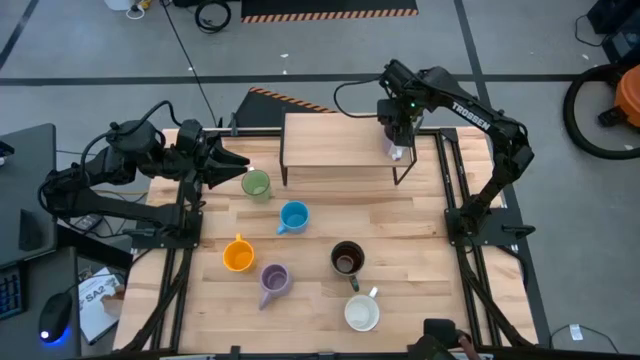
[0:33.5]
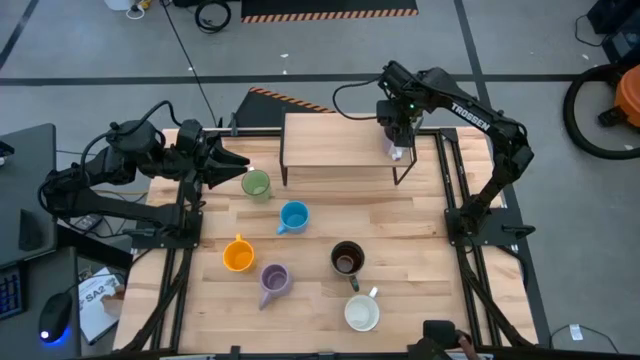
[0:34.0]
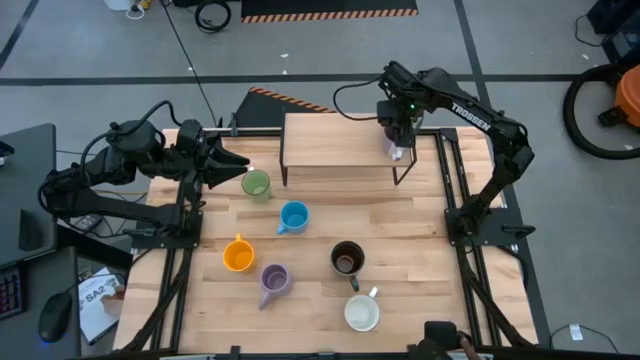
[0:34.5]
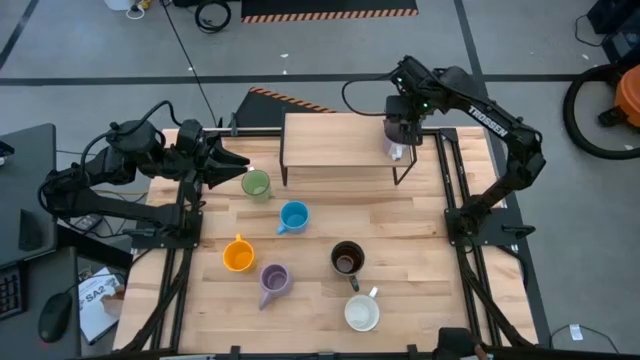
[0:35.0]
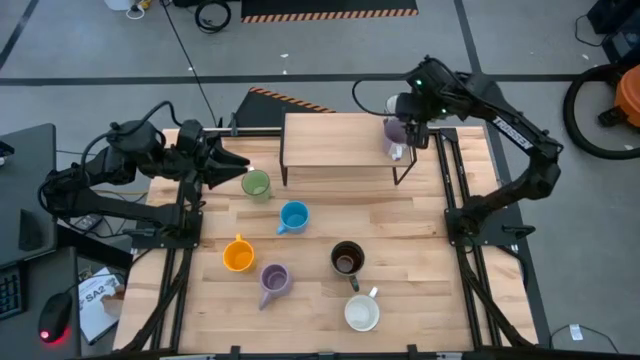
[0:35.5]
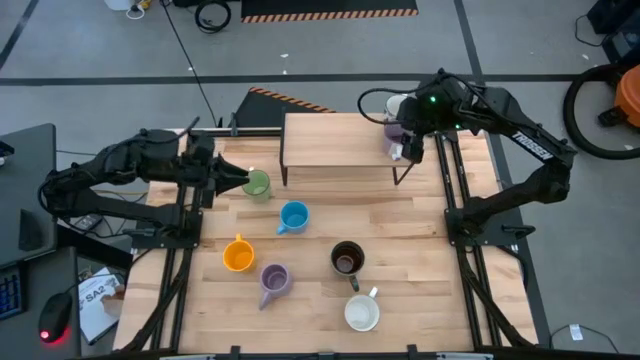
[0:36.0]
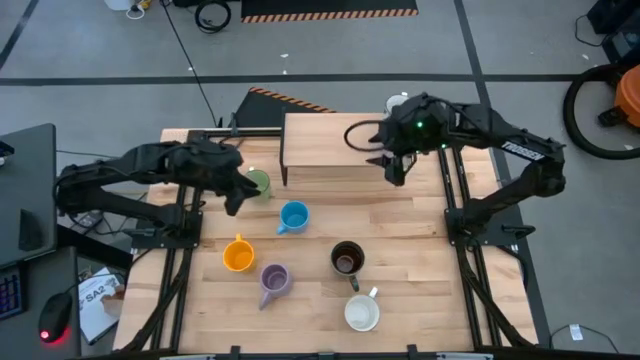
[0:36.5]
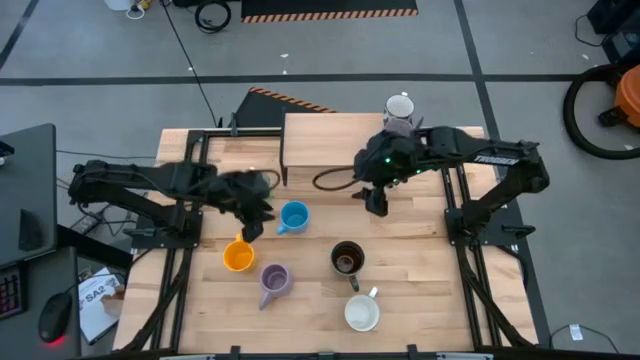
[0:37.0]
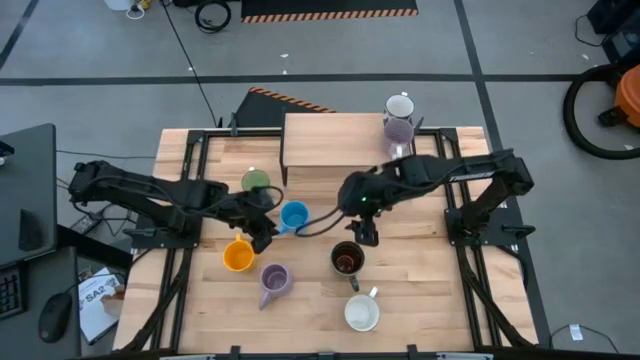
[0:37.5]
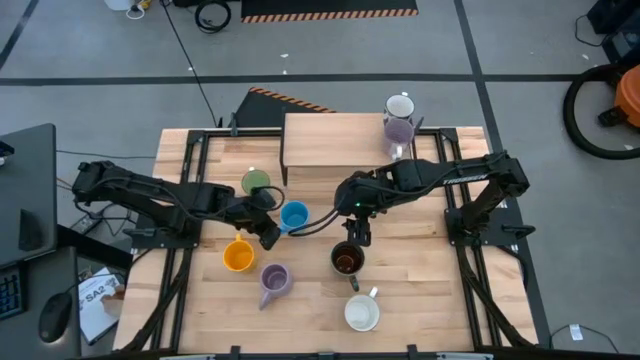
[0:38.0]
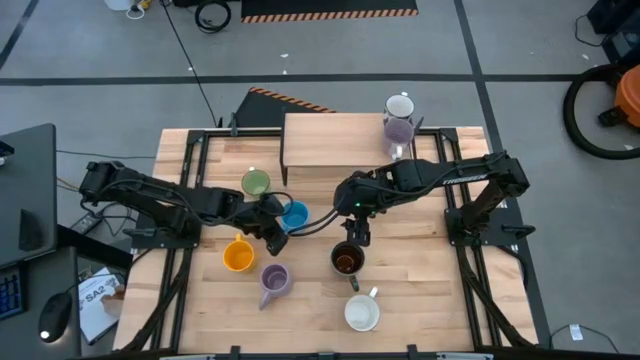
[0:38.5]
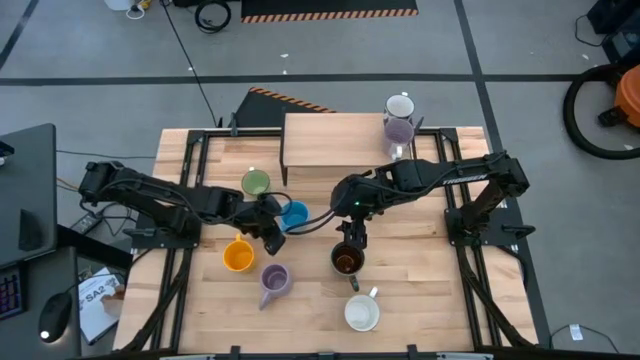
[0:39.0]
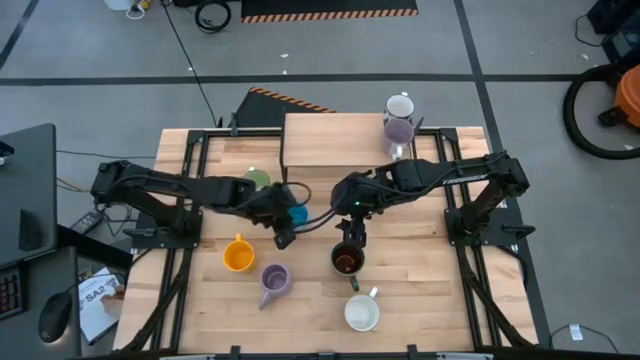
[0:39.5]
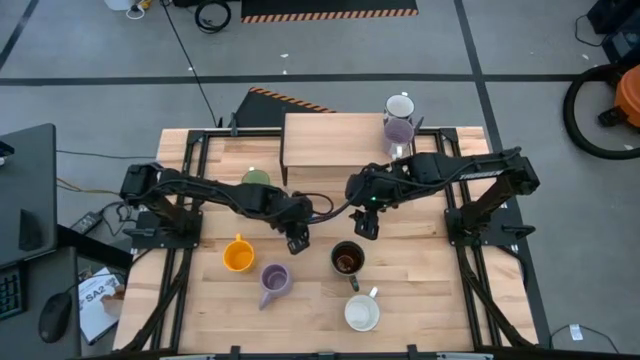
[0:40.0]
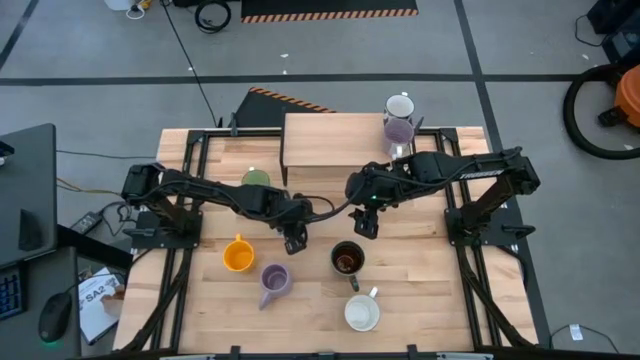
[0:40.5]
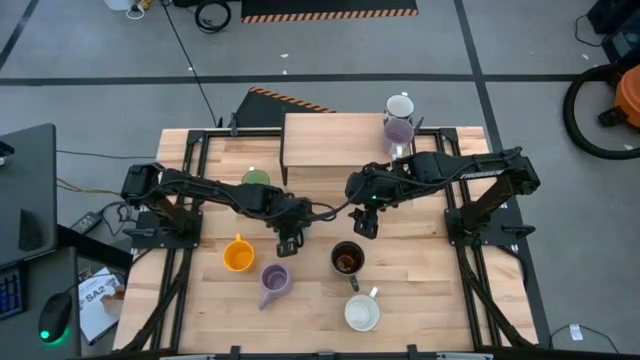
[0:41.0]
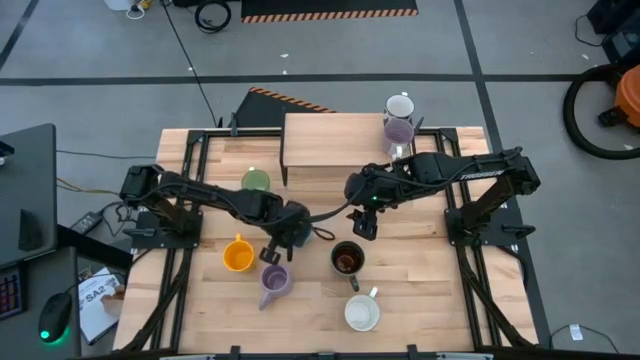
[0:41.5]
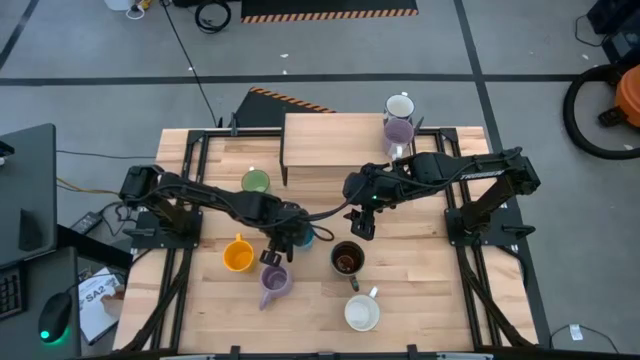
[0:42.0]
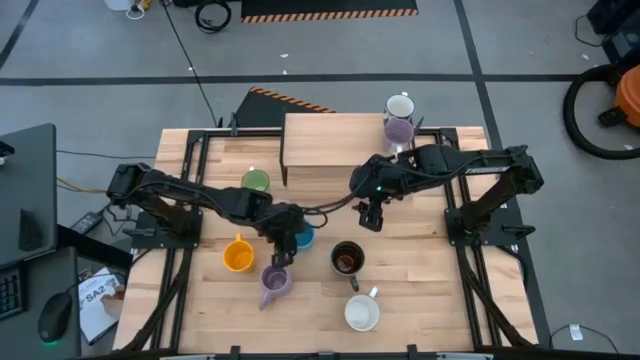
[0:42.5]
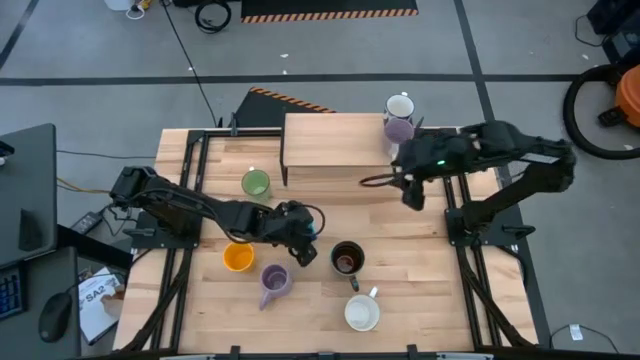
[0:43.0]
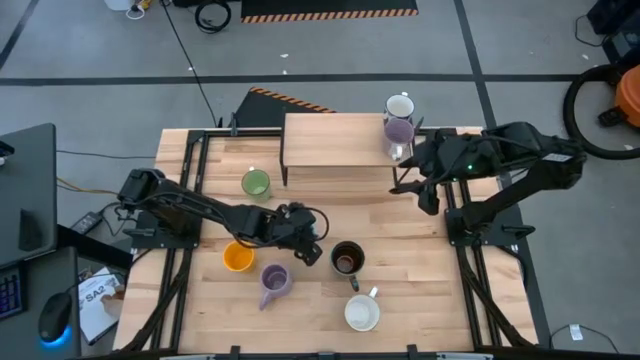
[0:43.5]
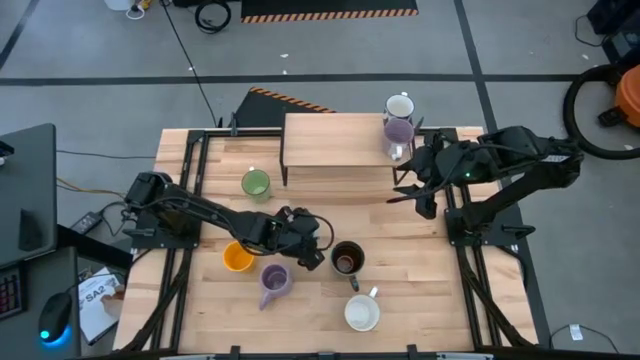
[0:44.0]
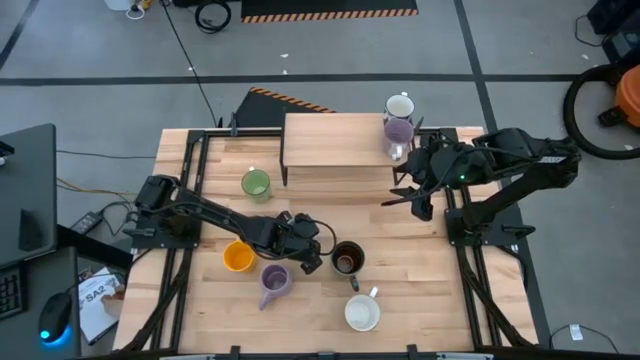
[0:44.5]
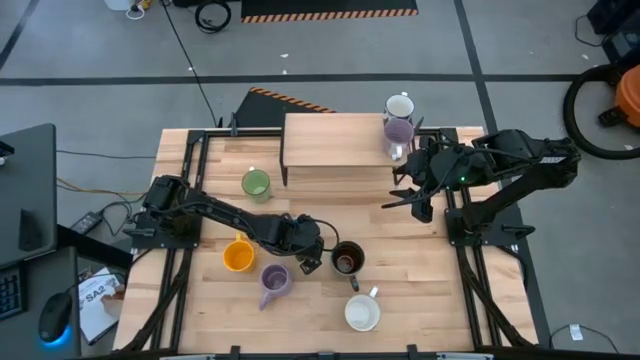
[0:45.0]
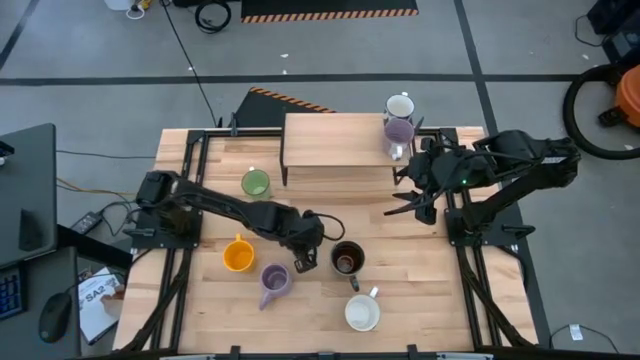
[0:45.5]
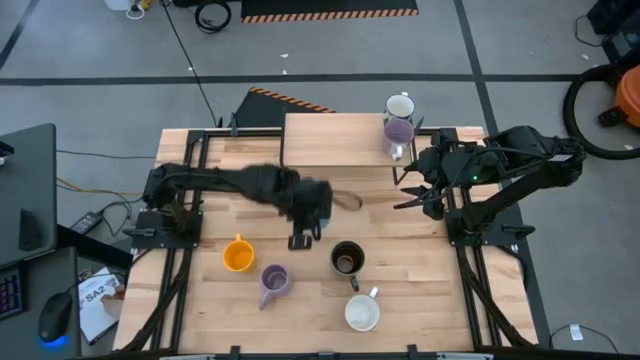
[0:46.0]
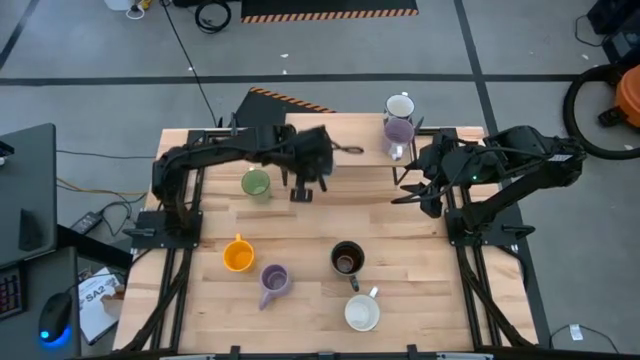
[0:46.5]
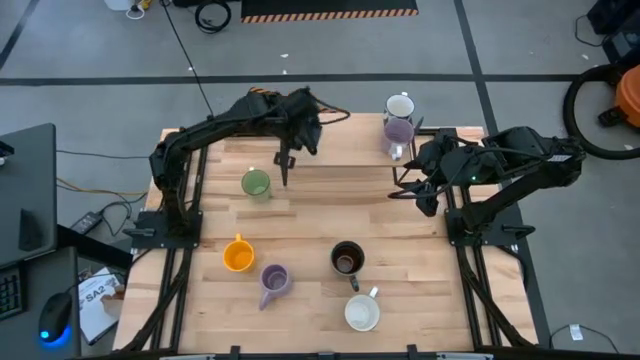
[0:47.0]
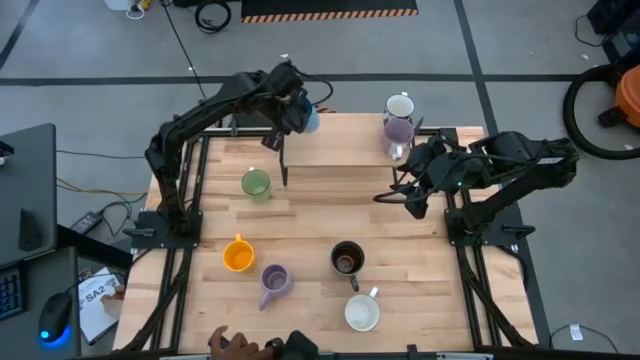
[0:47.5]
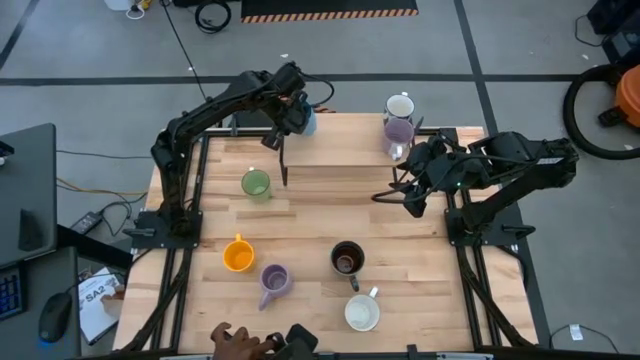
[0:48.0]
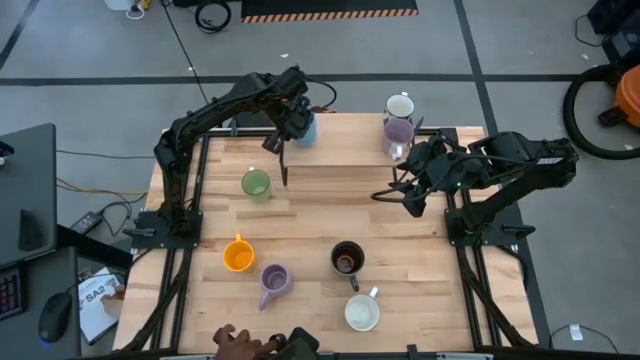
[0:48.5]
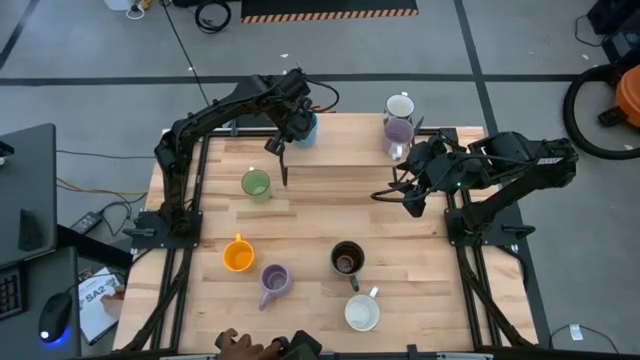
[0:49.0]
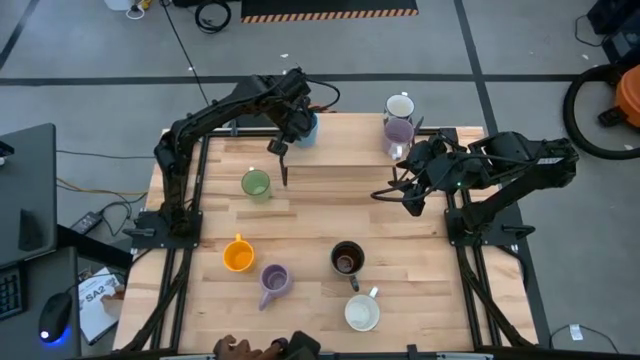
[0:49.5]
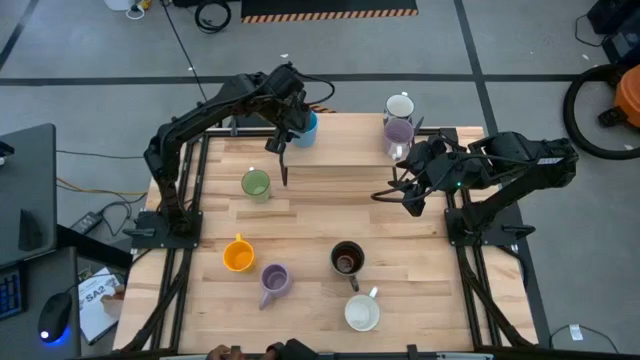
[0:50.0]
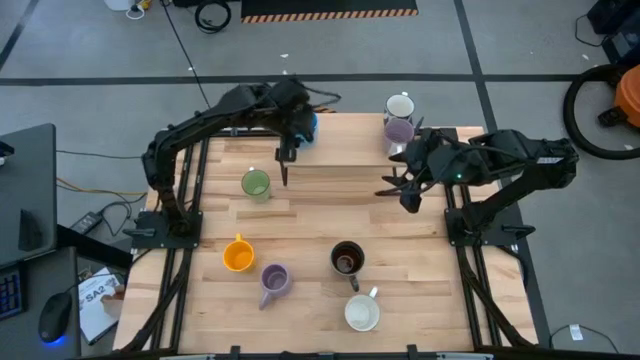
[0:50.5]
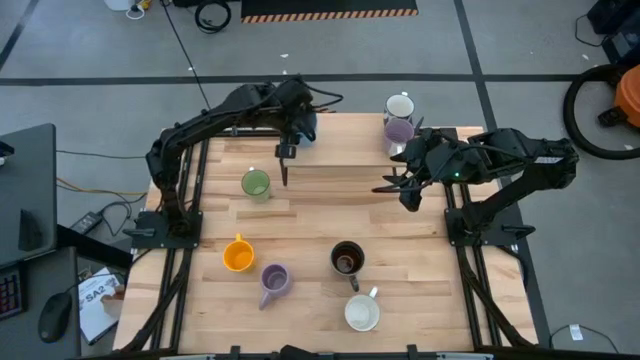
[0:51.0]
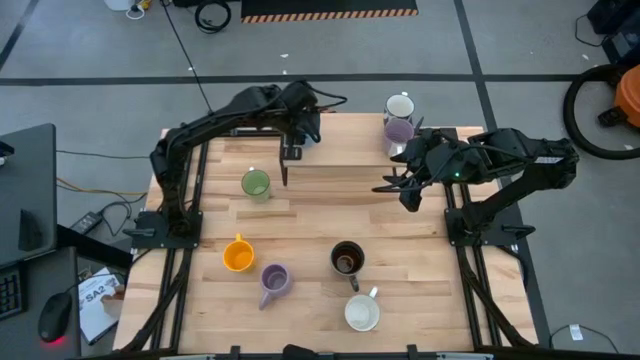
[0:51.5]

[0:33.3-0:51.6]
Task: Place coffee mugs
Put the light blue mug on the shelf

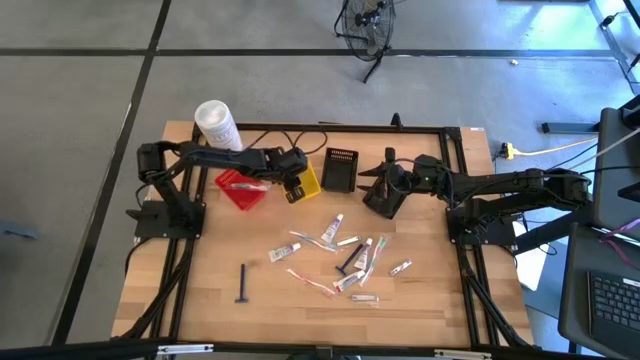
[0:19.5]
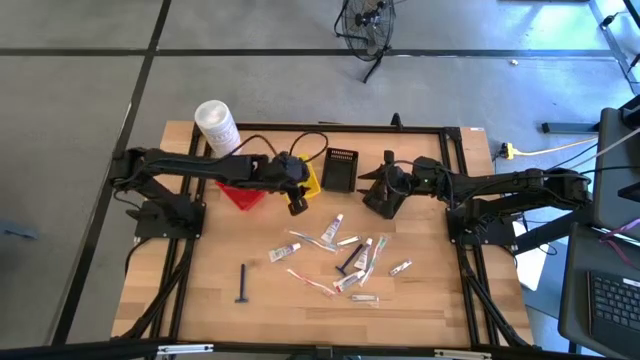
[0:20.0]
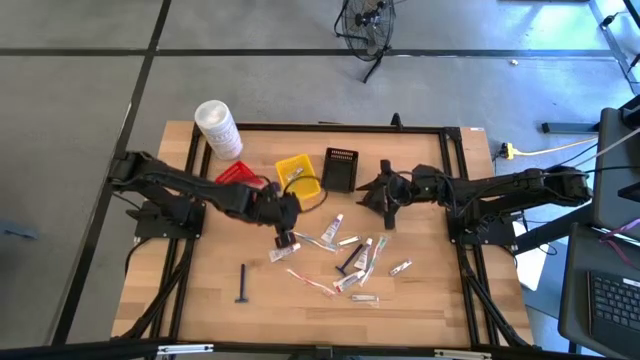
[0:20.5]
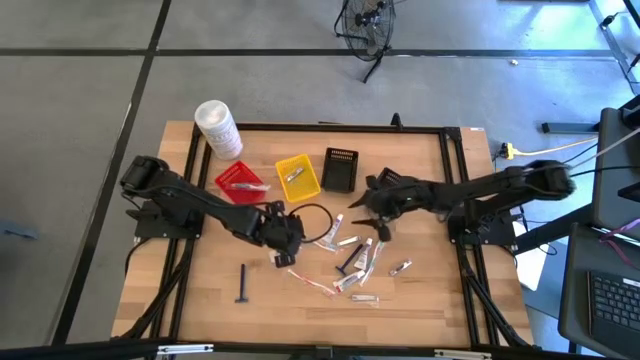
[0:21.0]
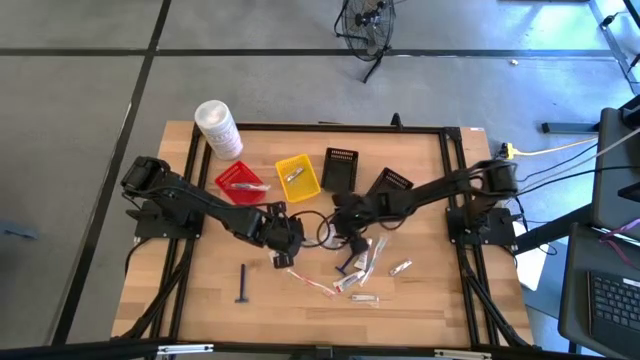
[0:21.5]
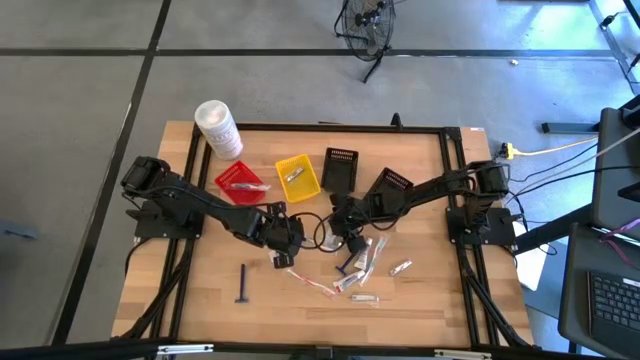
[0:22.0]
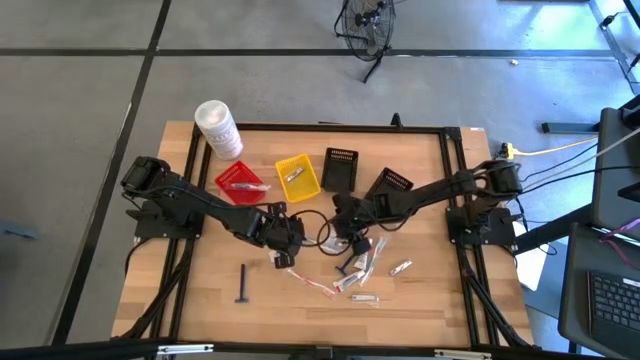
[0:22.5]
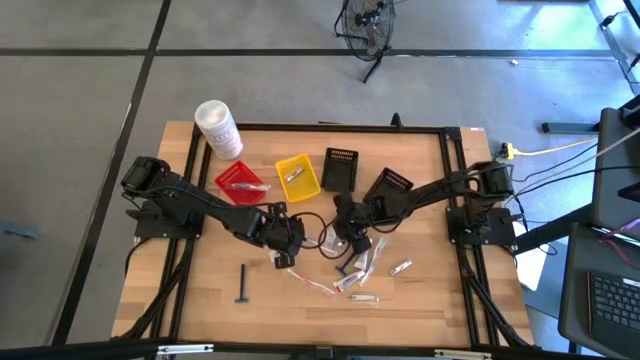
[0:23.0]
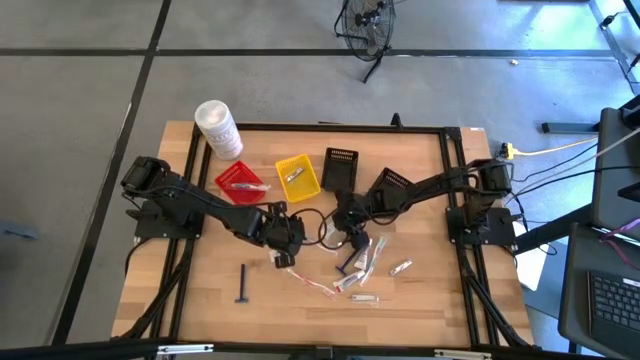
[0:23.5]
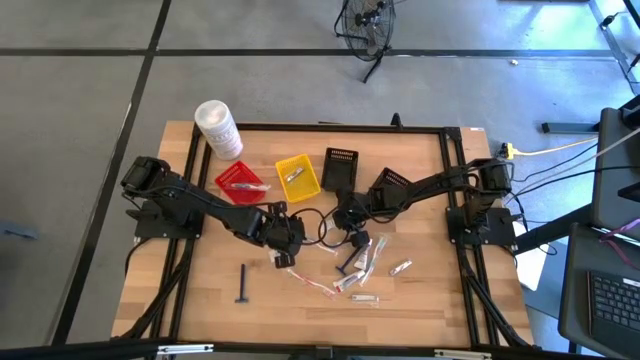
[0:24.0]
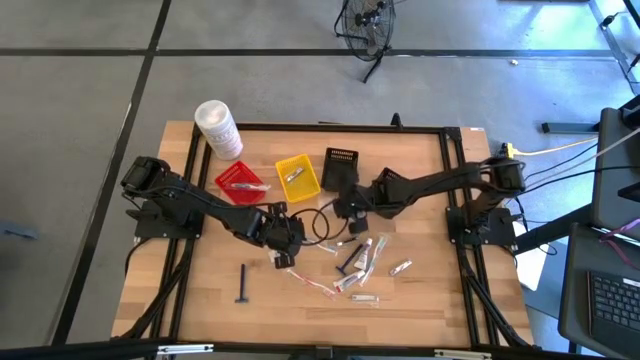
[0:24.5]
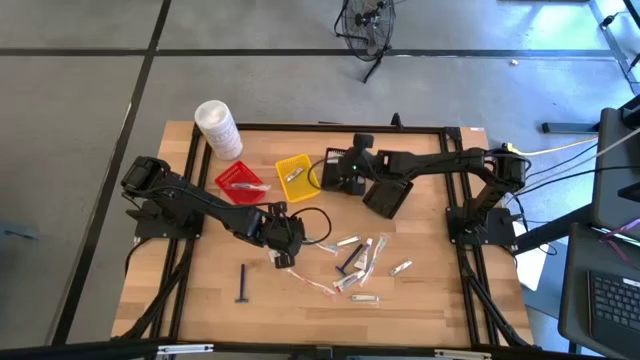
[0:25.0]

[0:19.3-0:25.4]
Task: Pick & Place Travel size toiletries
Put the toothpaste into the left black bin
